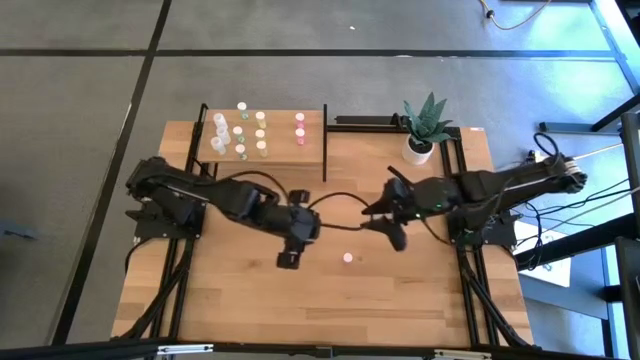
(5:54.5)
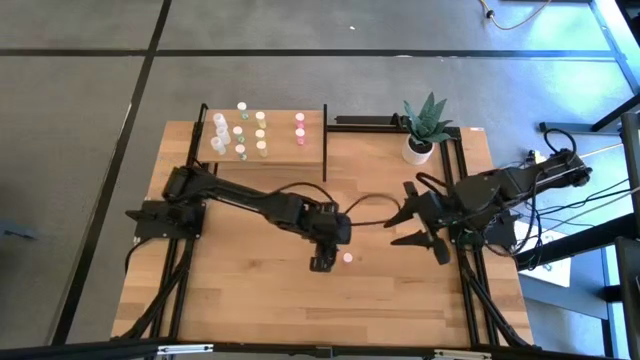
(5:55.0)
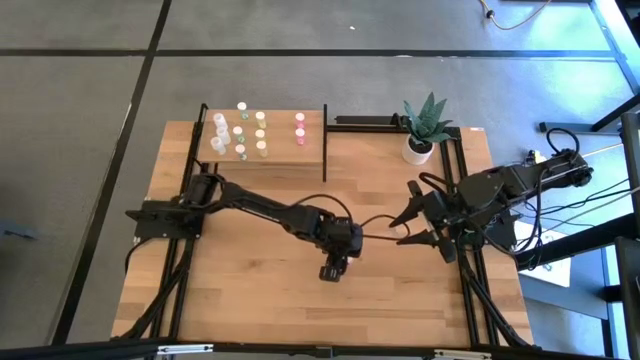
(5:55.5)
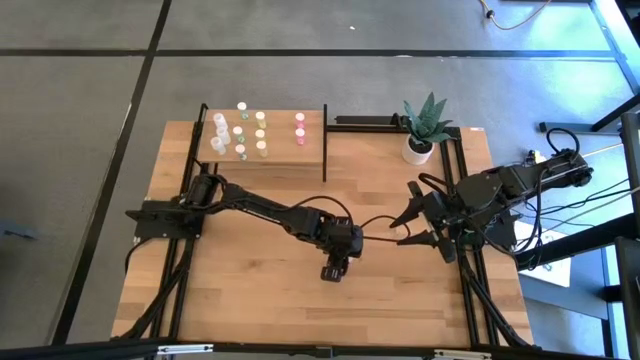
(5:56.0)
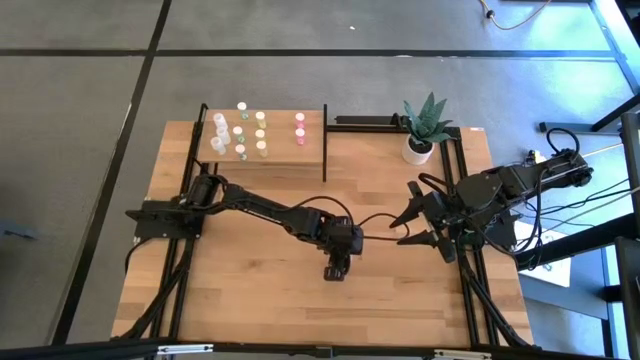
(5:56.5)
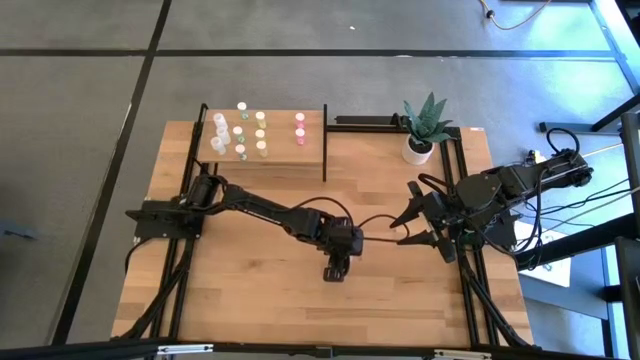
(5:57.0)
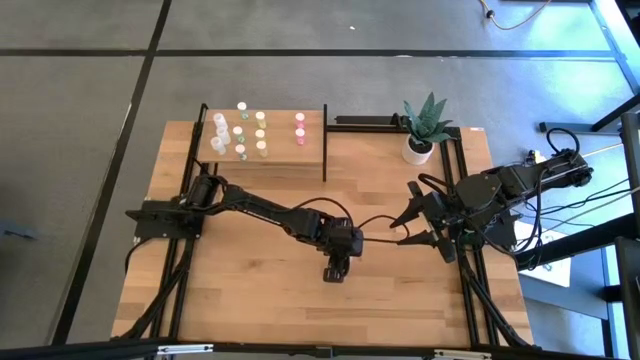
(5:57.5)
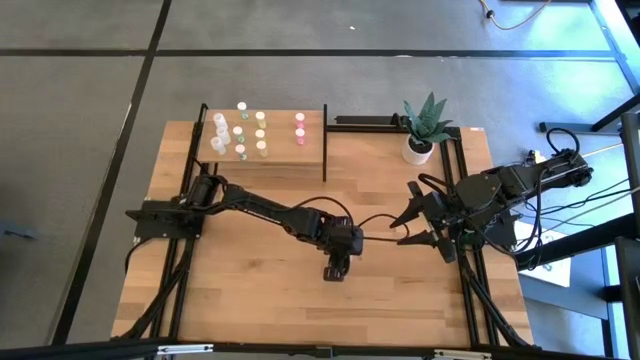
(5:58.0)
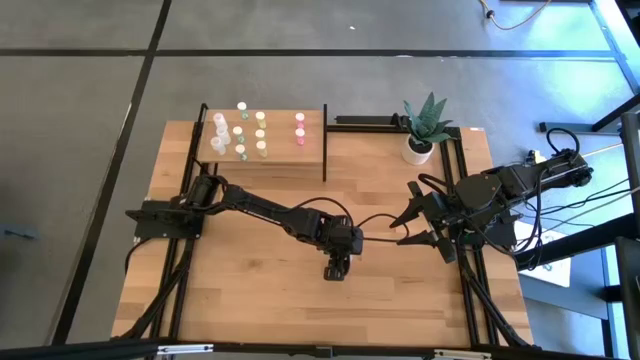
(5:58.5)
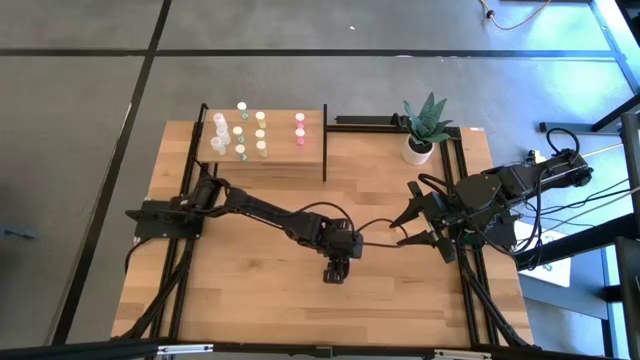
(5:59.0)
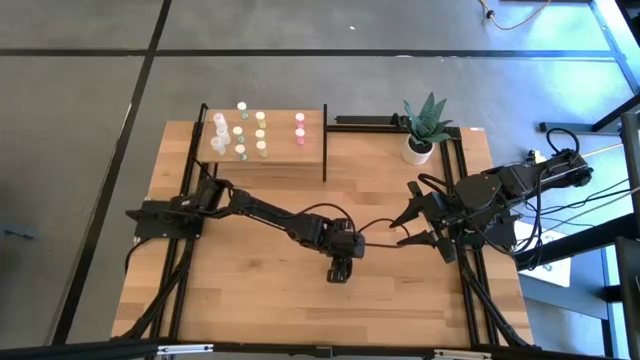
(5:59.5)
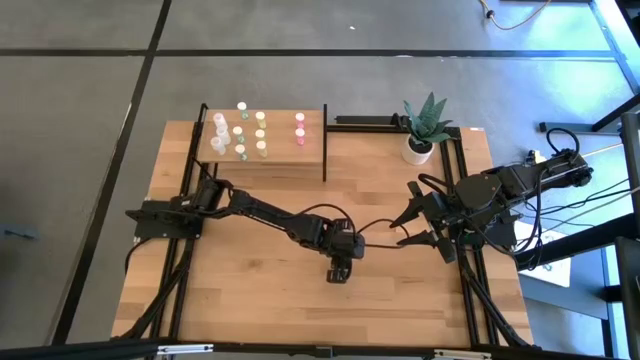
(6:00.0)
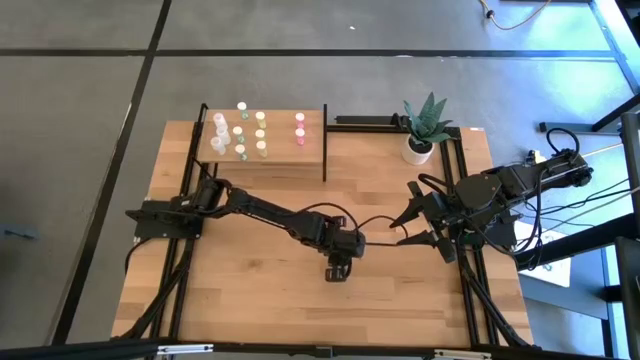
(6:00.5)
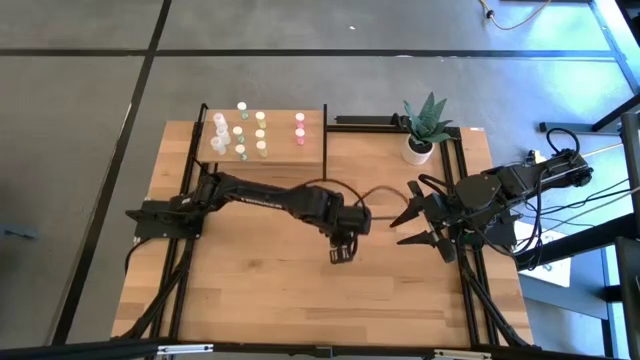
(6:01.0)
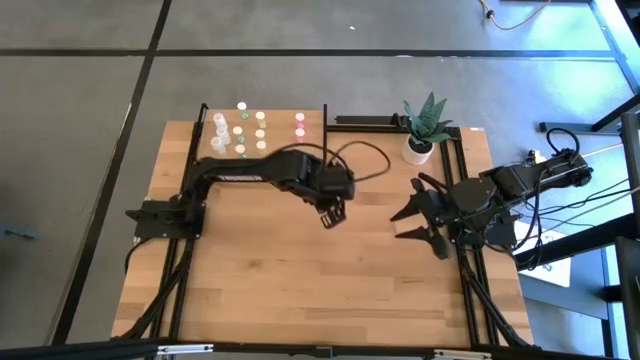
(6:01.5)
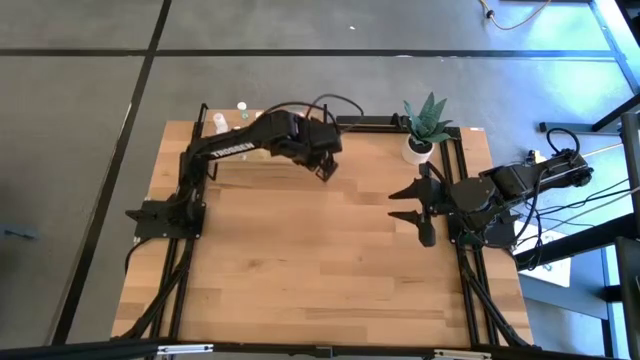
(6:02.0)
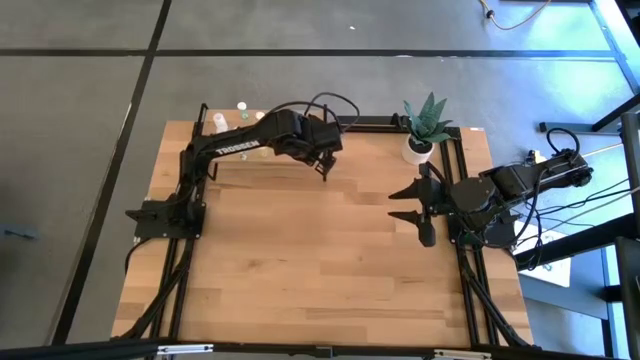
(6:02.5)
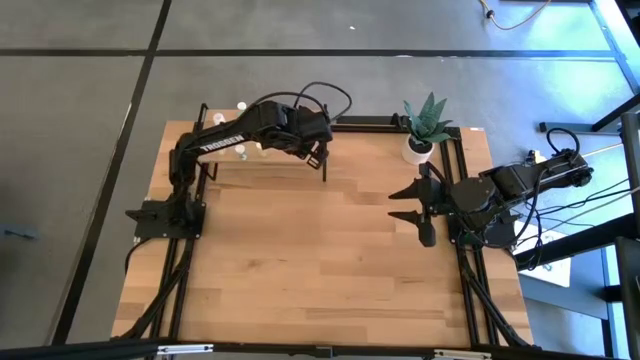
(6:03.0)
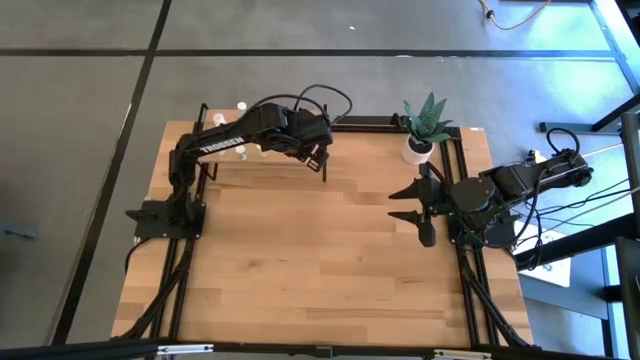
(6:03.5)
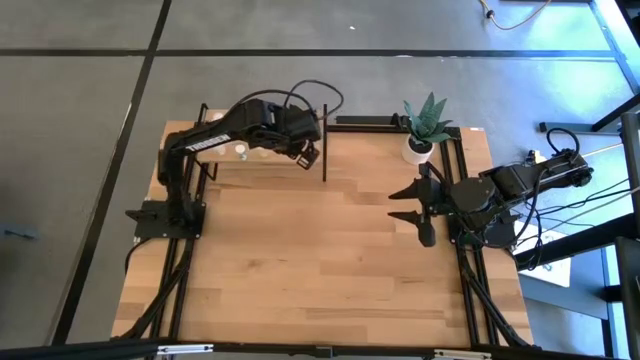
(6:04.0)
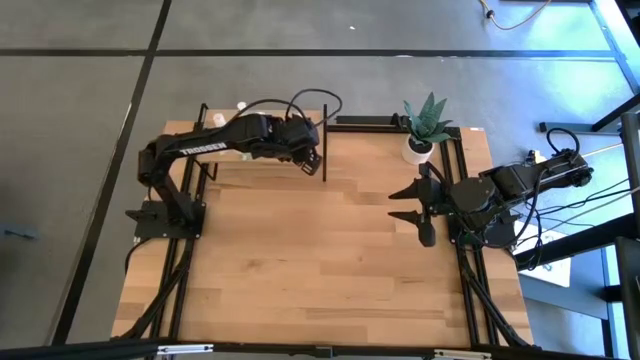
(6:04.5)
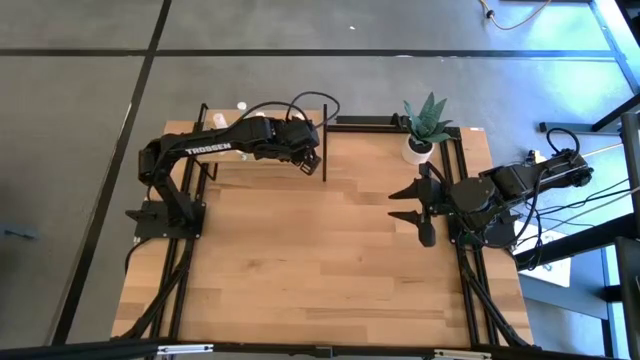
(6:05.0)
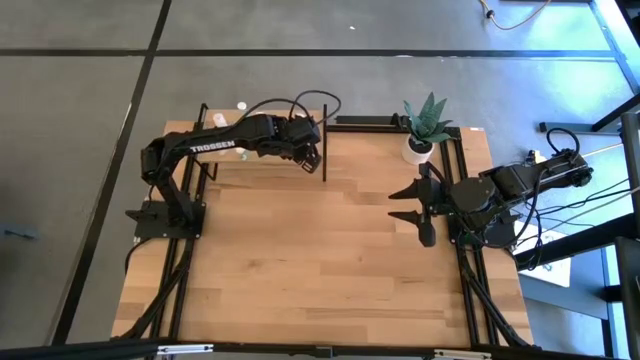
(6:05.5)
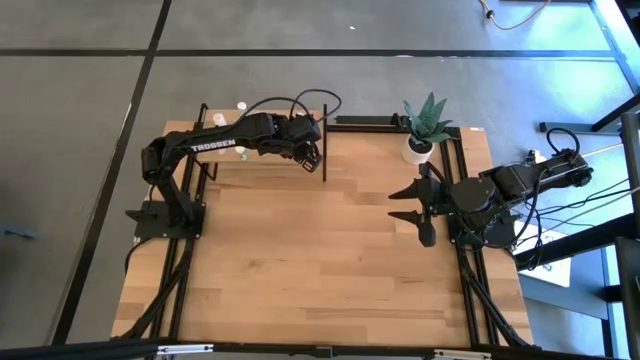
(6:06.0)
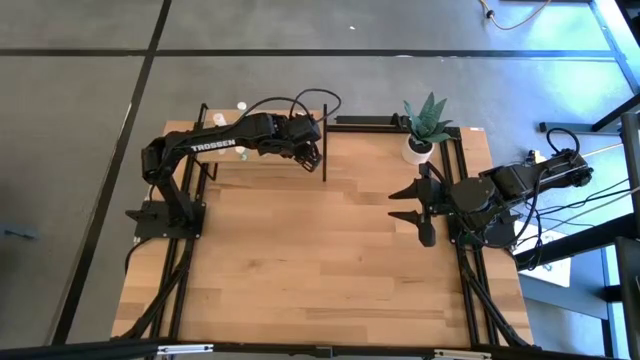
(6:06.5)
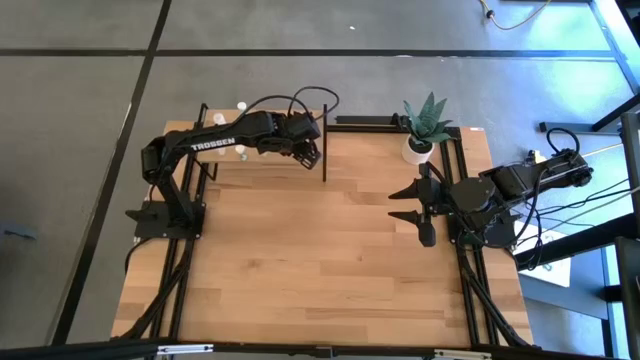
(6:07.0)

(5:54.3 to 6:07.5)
Task: Pick and place medicine bottles onto shelf by color
Put the pink pill bottle aligned with the other pink pill bottle on the shelf

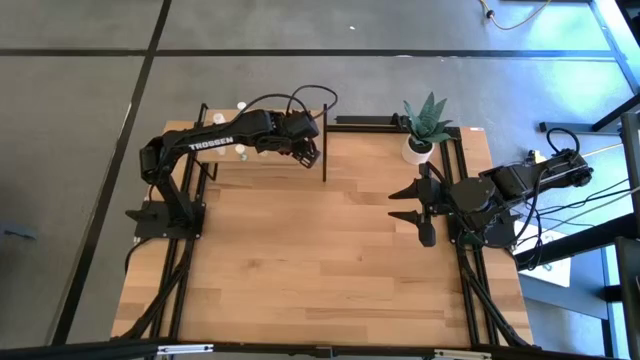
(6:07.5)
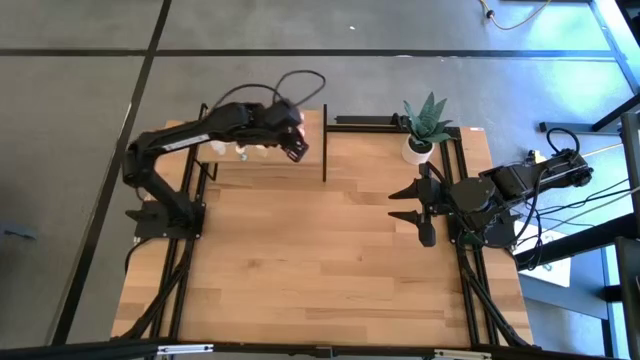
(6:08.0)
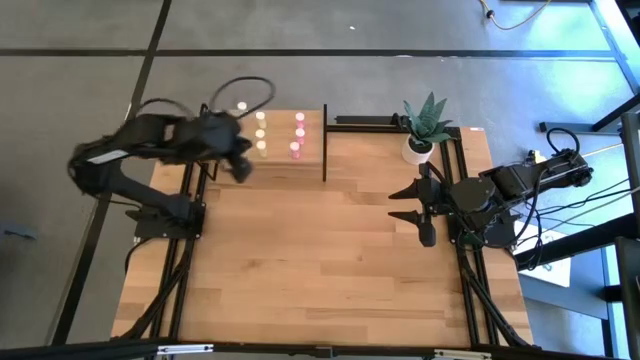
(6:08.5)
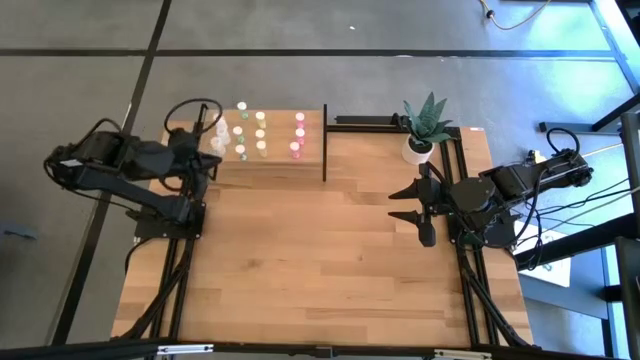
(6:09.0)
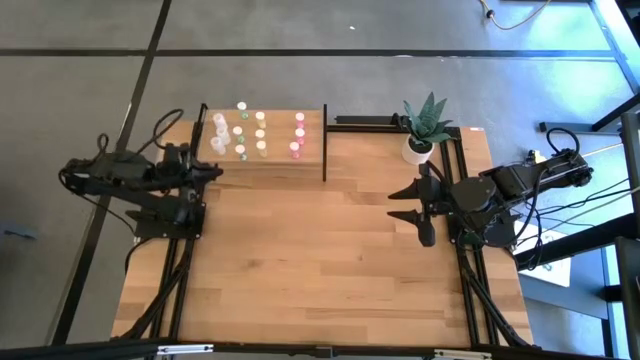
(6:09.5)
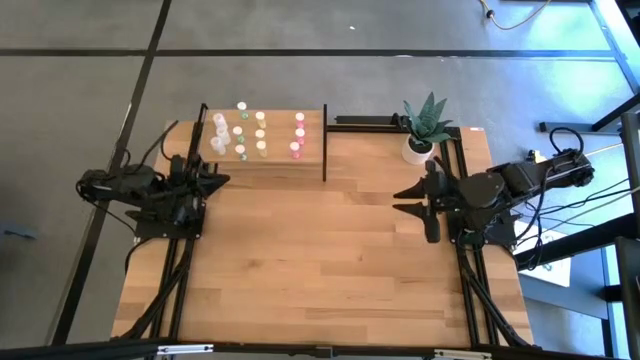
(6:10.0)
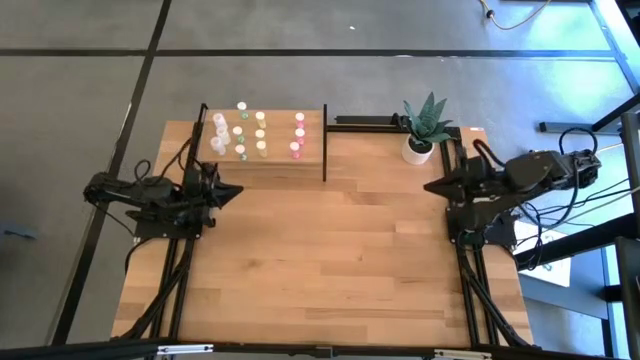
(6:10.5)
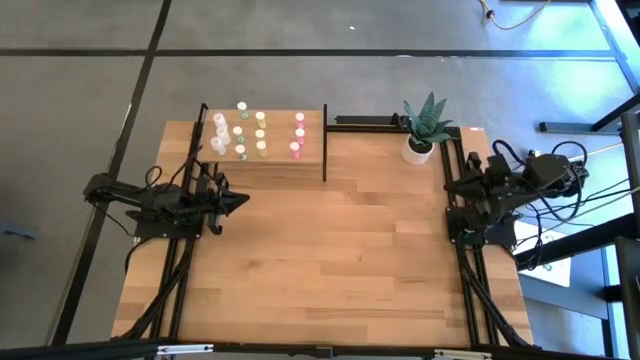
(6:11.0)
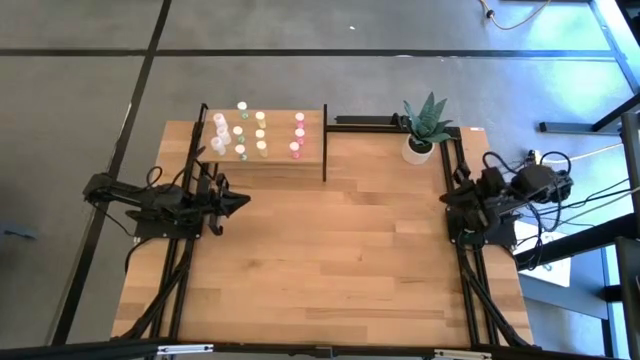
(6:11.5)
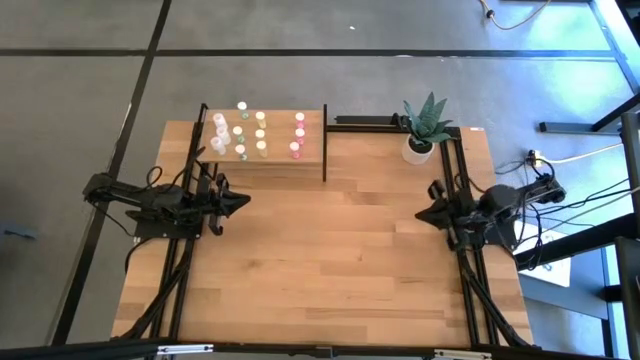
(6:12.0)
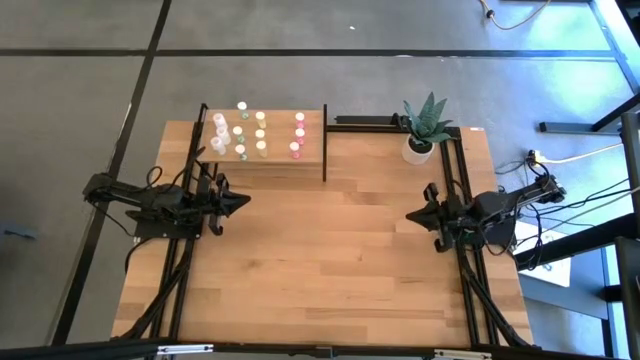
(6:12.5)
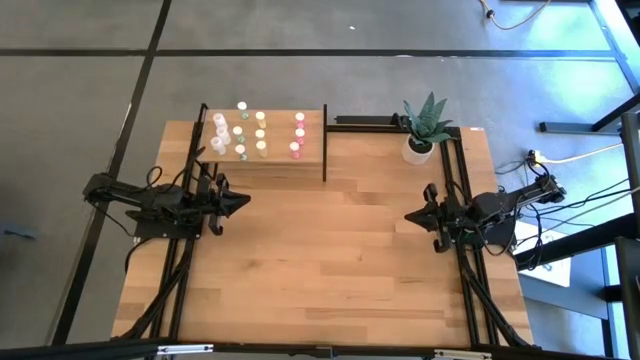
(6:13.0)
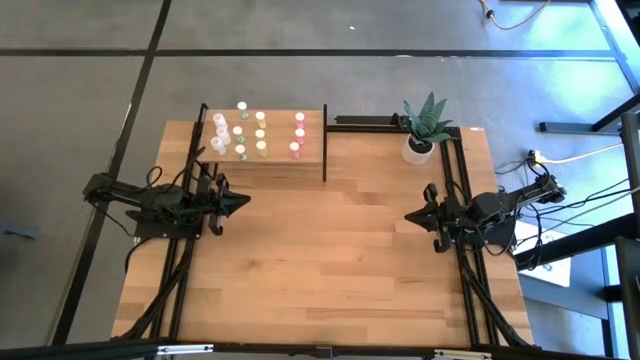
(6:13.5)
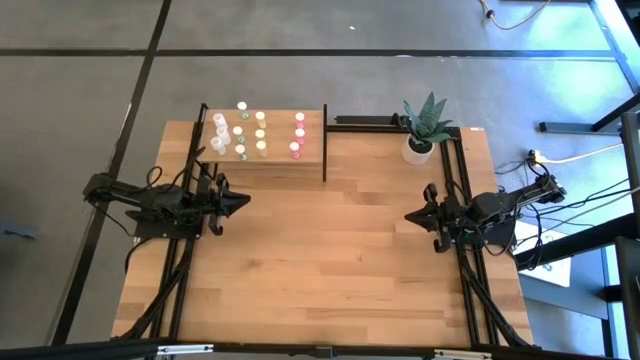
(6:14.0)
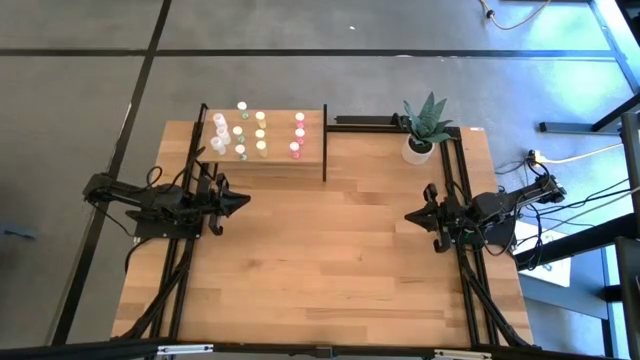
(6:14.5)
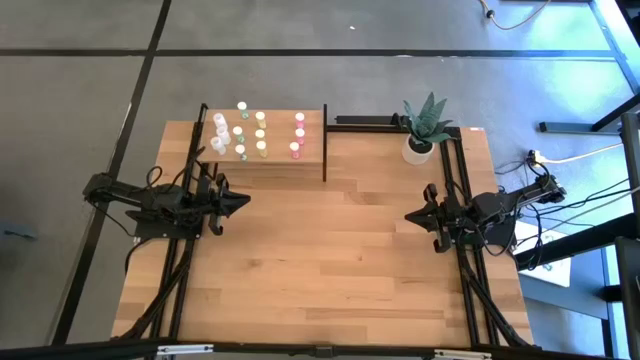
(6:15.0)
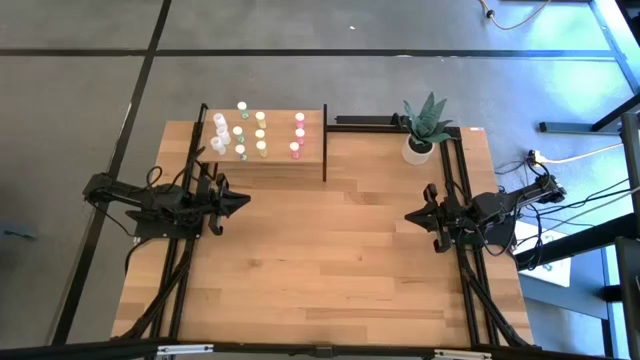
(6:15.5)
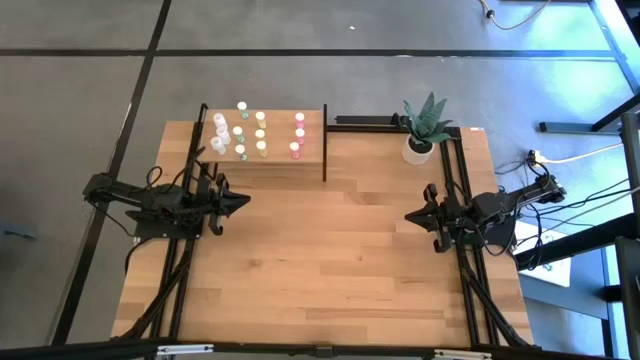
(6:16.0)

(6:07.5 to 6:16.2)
Return to Home Position
